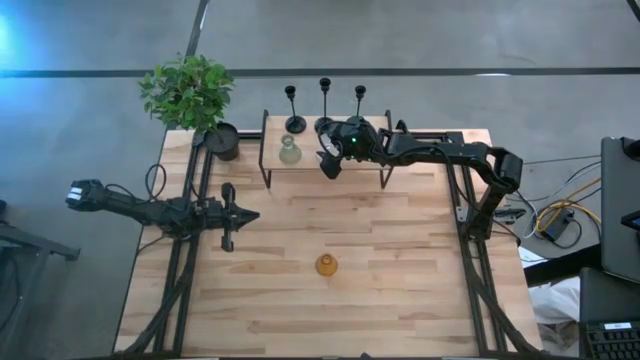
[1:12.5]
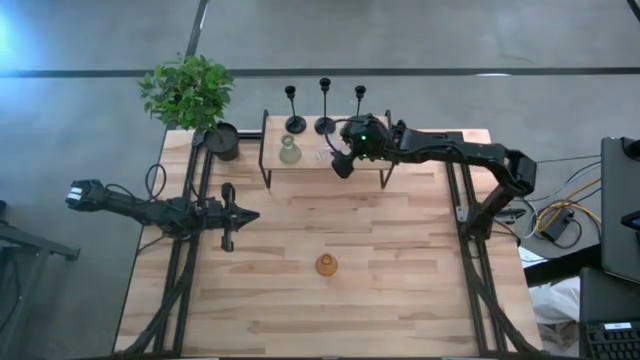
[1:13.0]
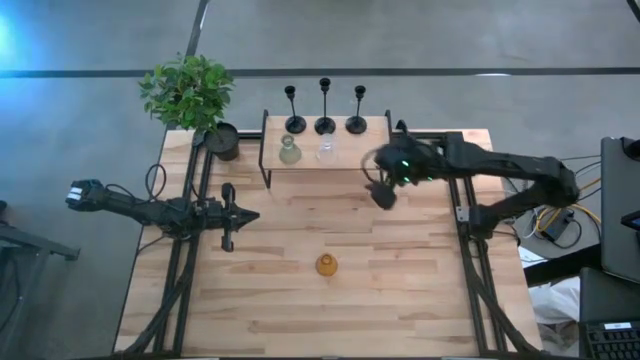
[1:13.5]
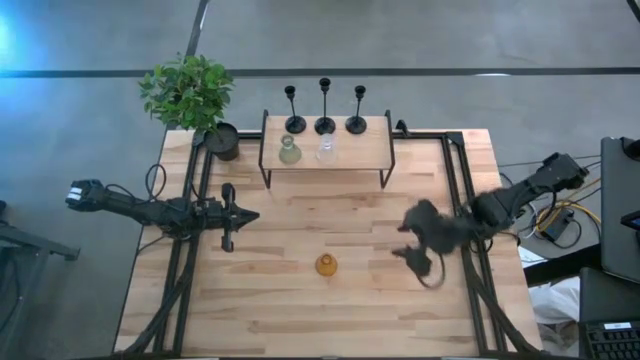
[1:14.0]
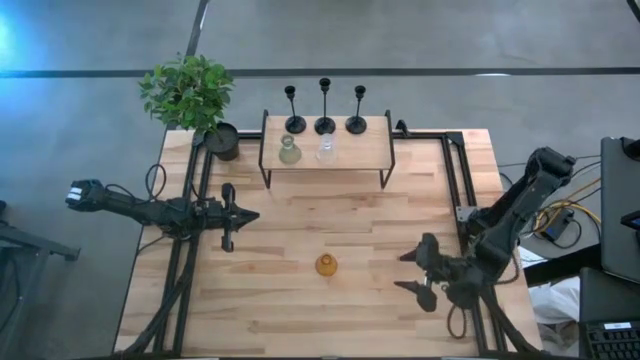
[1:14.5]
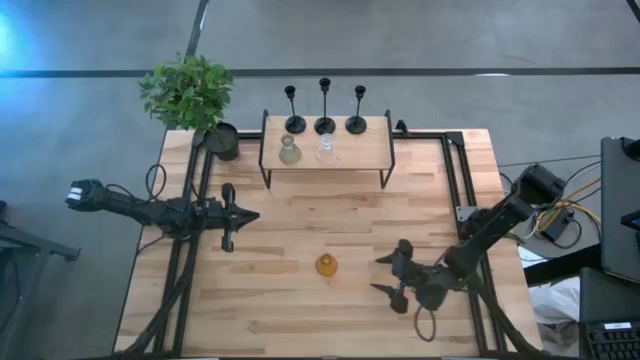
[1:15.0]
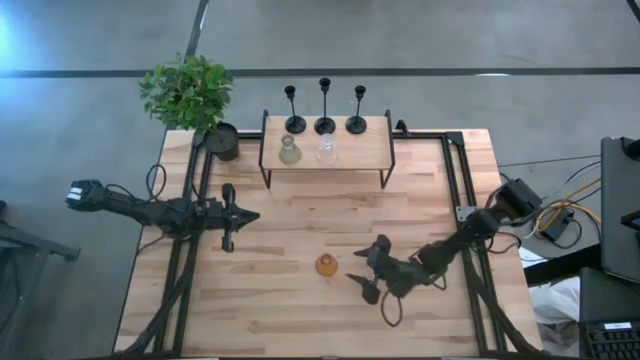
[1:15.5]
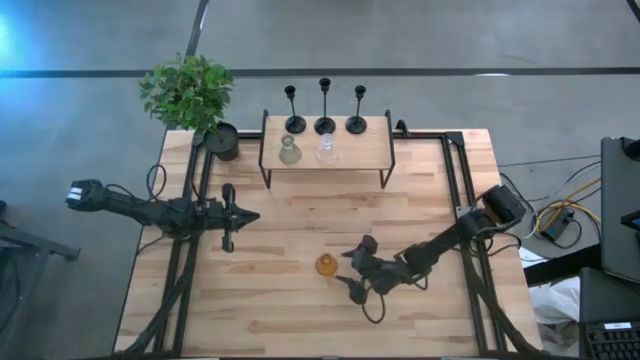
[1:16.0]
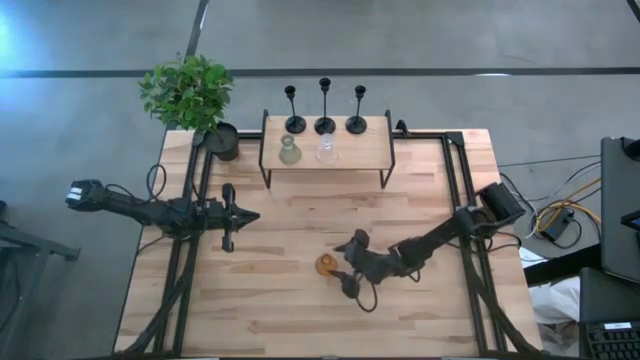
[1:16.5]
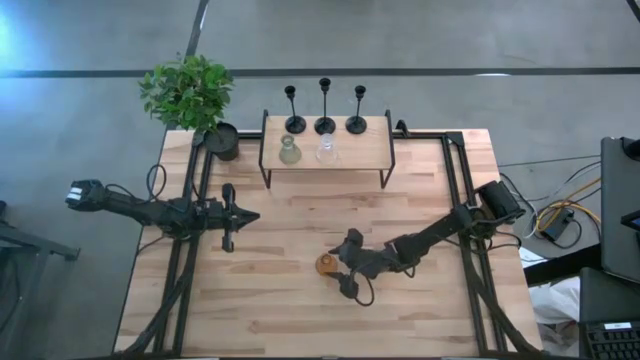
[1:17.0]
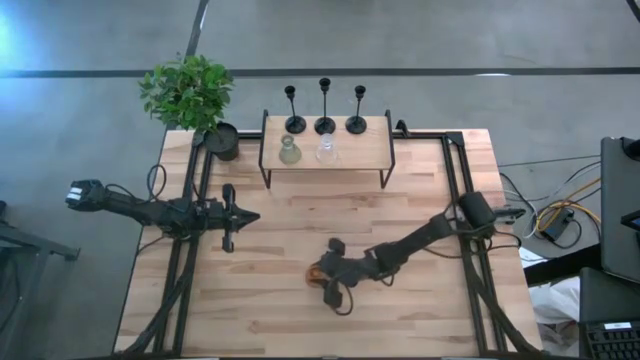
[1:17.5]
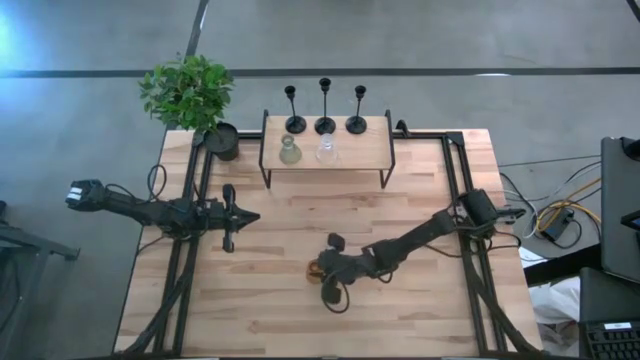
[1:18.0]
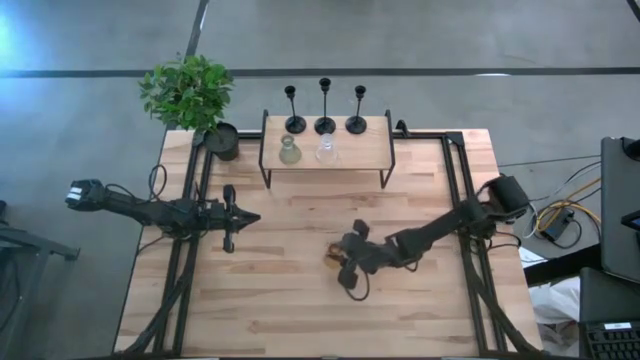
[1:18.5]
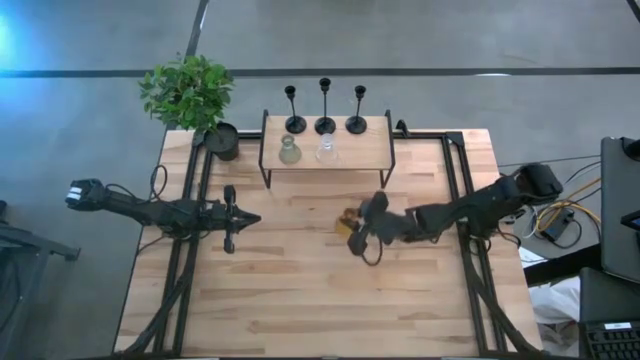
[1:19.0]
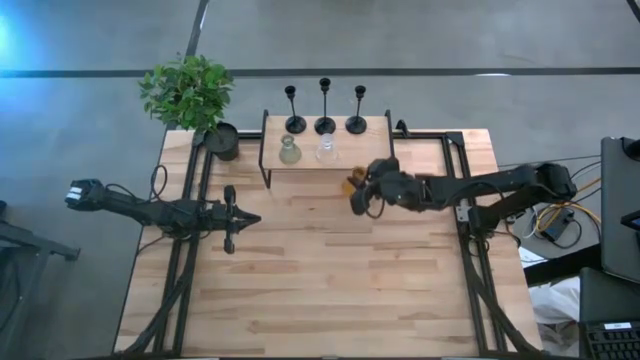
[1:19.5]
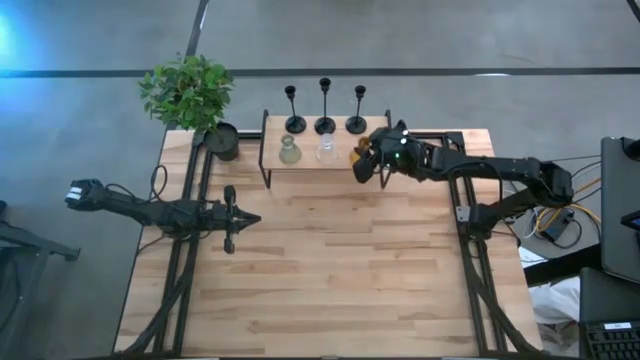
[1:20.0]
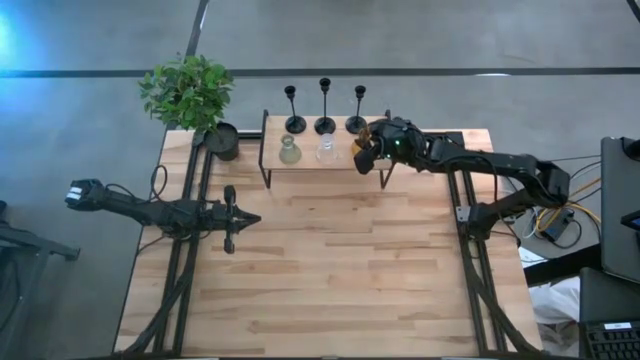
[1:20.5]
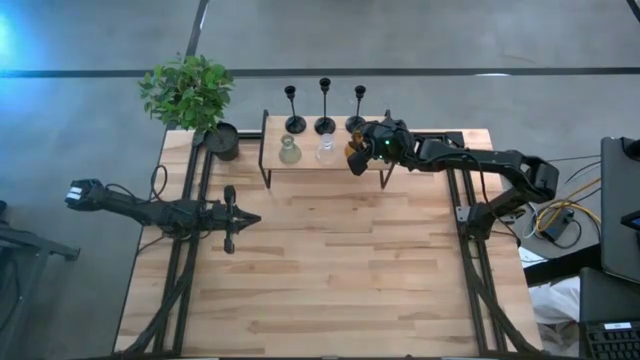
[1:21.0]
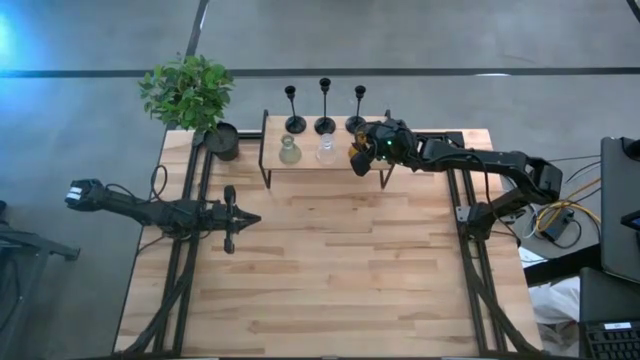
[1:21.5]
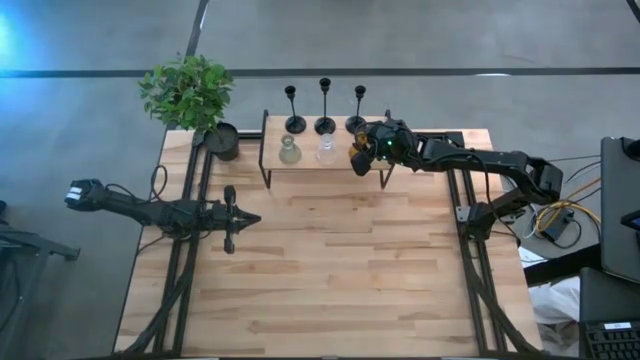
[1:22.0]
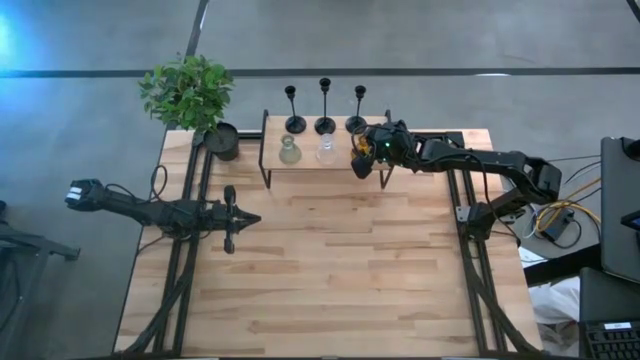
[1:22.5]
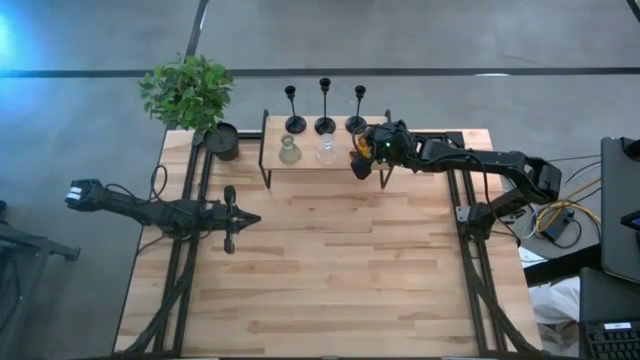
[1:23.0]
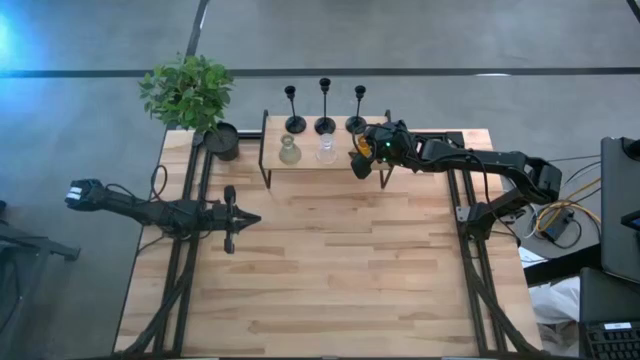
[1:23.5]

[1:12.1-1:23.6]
Task: Pick & Place candle stick holders
Put the orange candle holder on the shelf

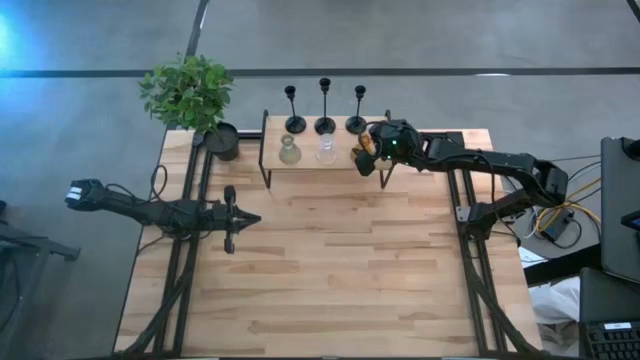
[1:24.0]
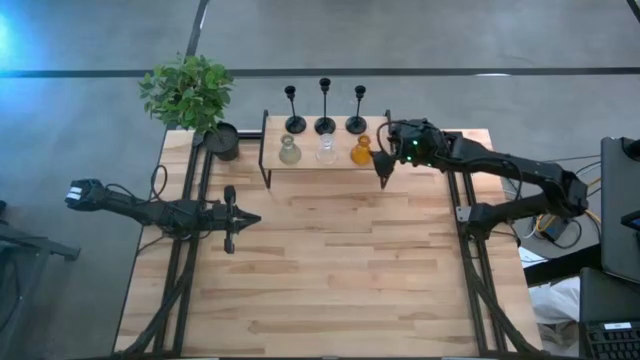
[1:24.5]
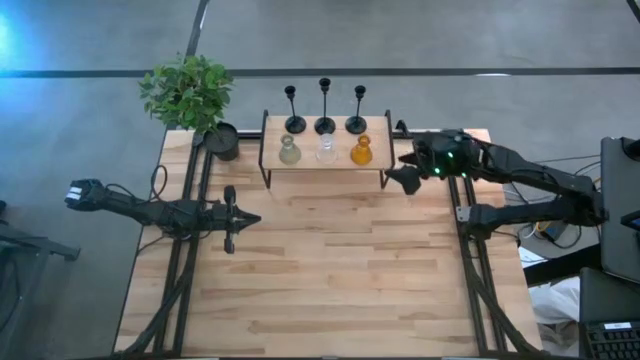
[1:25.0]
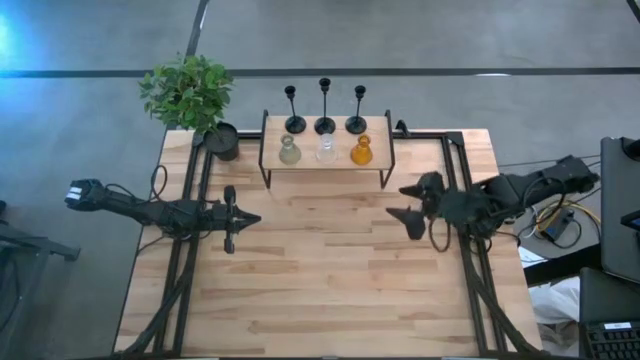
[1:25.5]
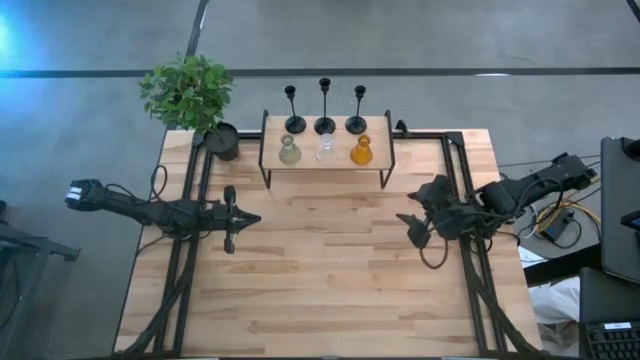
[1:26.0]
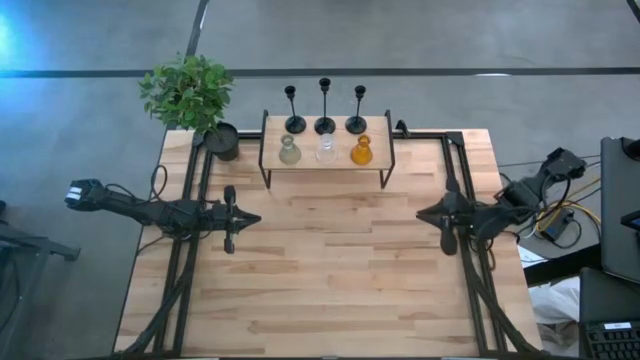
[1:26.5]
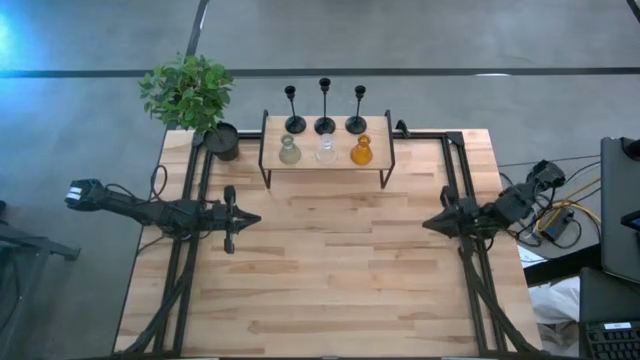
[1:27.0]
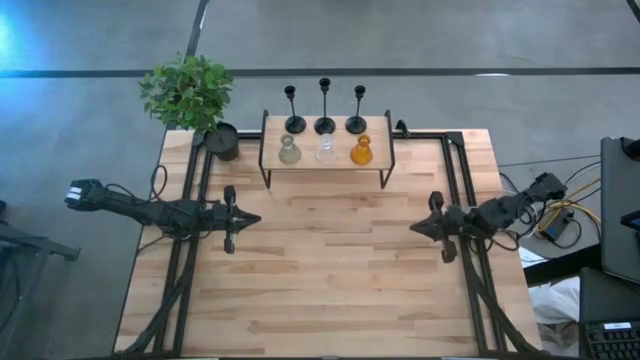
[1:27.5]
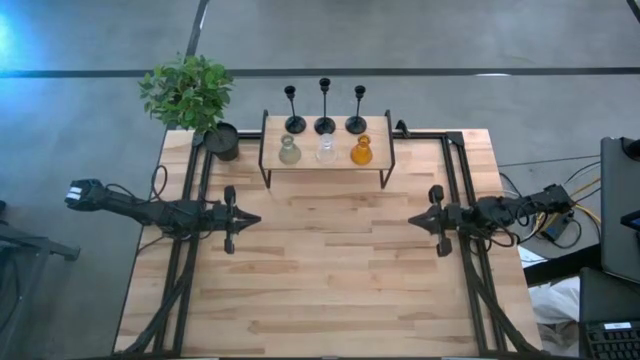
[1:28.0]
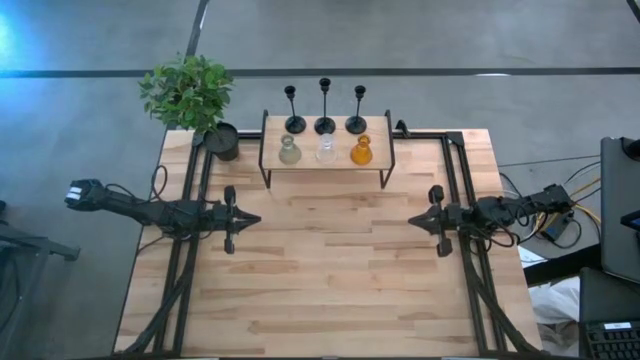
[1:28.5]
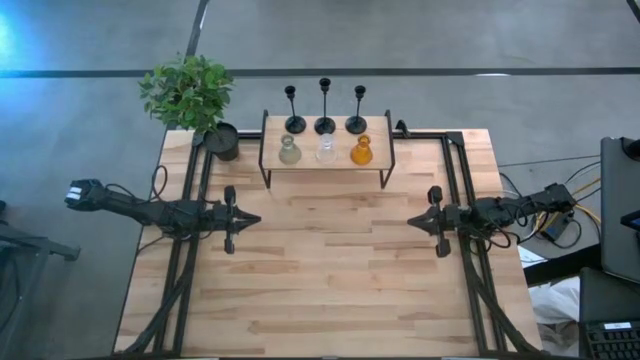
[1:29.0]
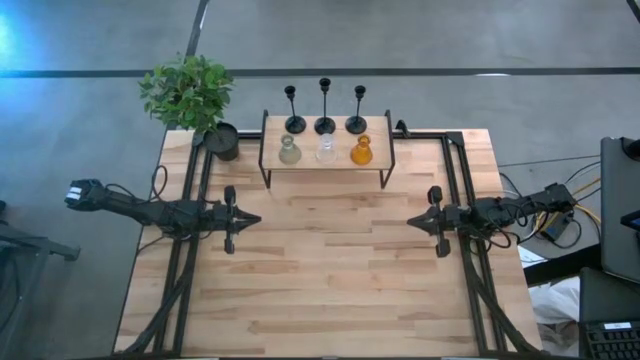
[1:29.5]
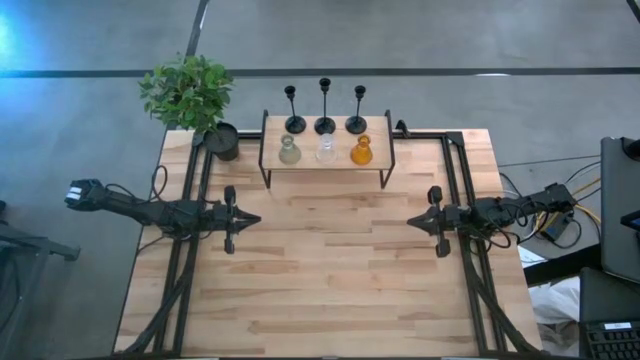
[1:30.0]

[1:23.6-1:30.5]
Return to Home Position

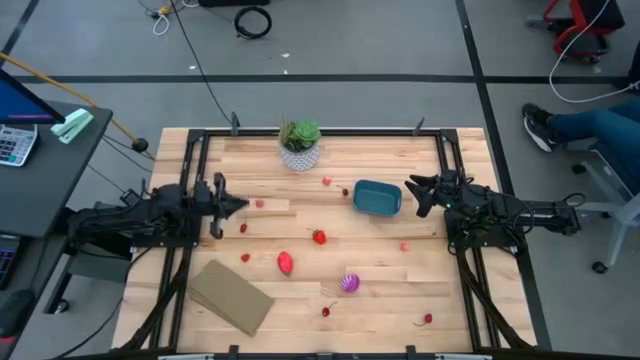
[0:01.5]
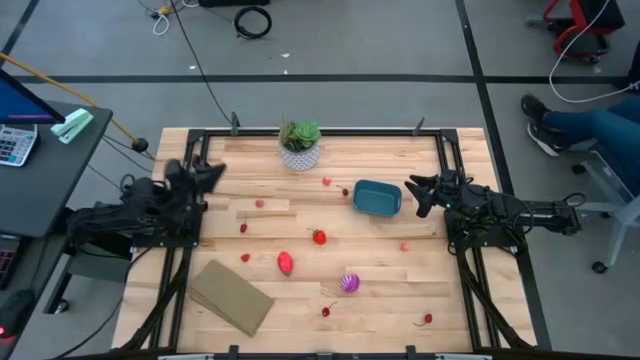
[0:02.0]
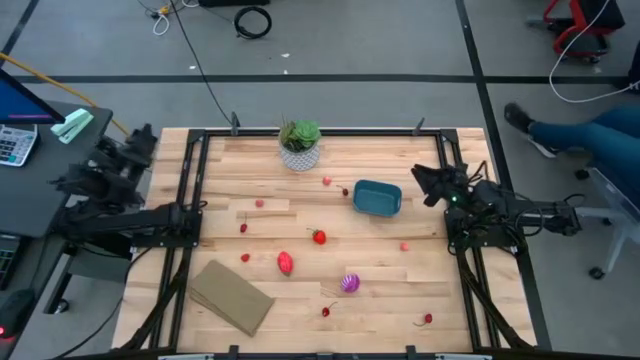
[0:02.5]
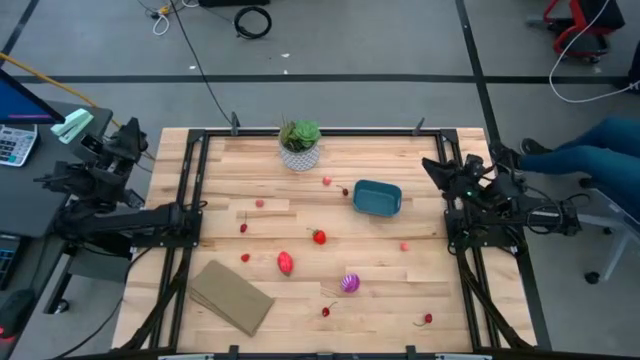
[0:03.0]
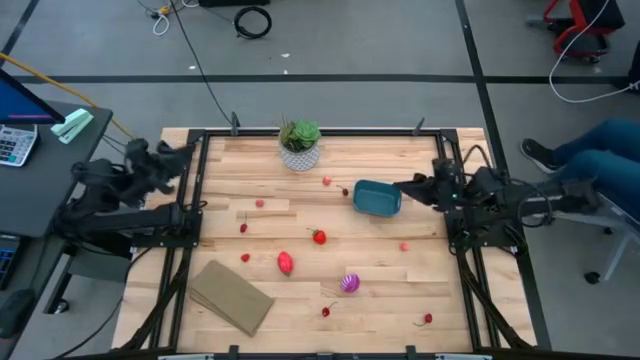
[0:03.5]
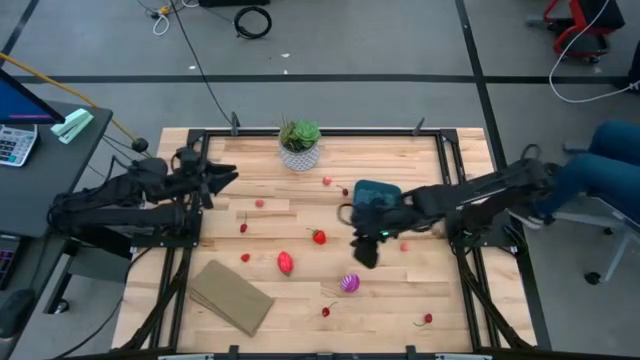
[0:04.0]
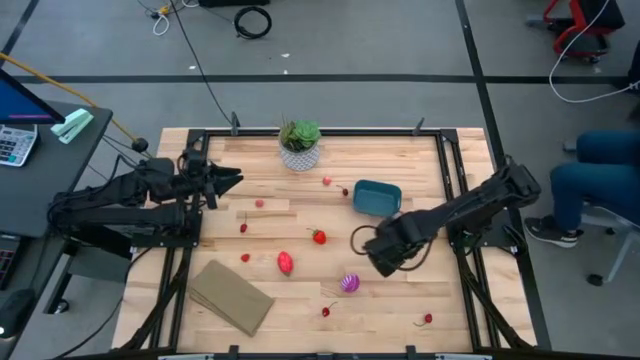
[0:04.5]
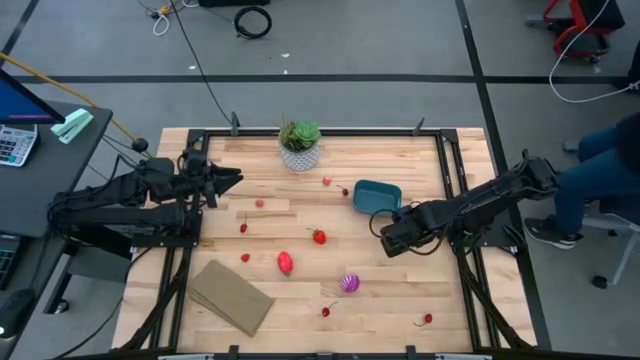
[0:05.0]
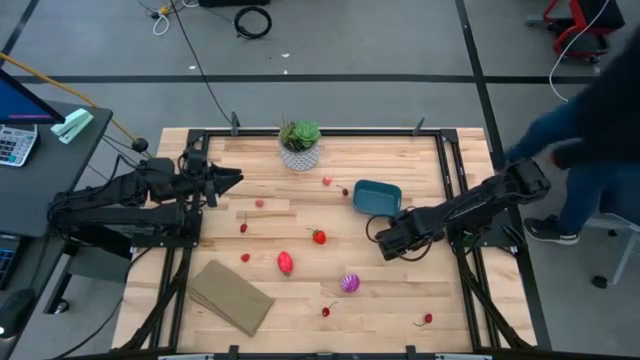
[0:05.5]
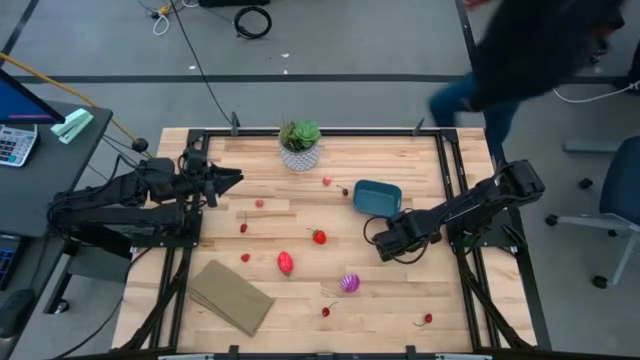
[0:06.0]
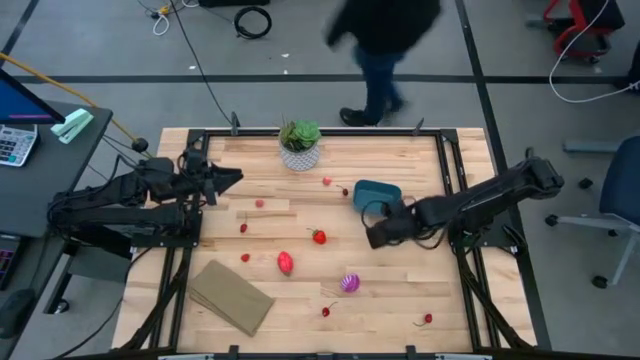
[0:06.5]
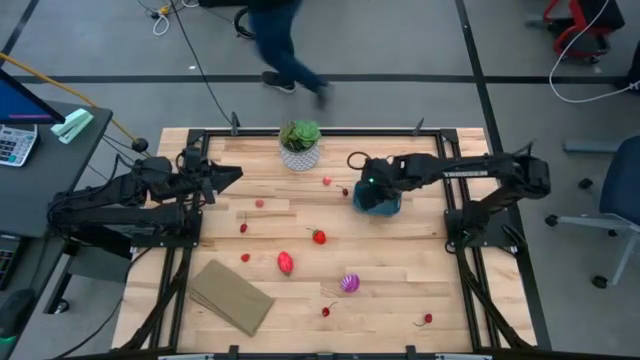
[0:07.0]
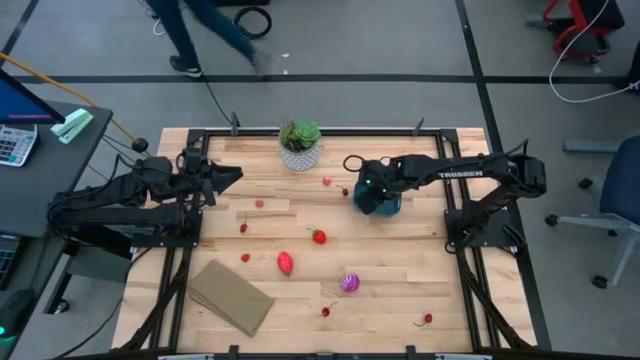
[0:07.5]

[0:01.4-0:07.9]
Task: Pick and placing Produce into tupperware
Put the bottom pink peach into the blue bin
